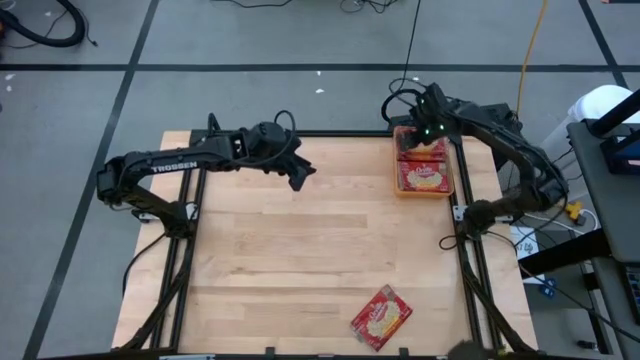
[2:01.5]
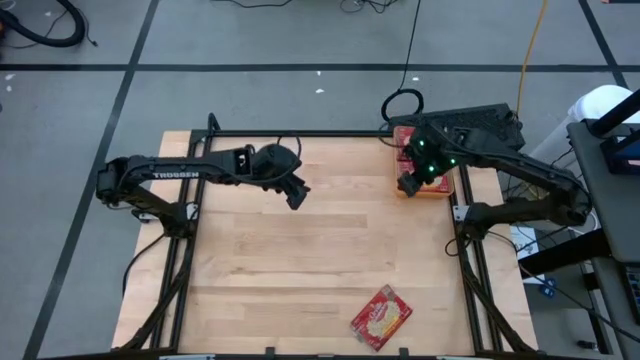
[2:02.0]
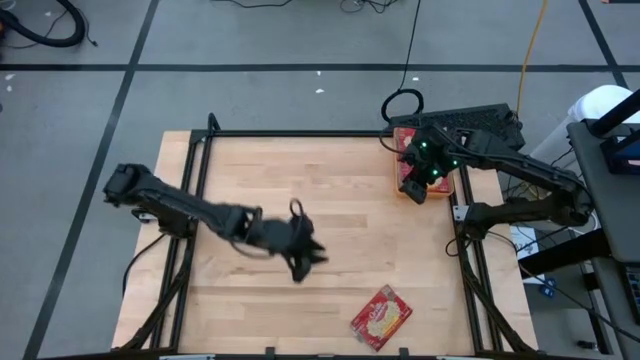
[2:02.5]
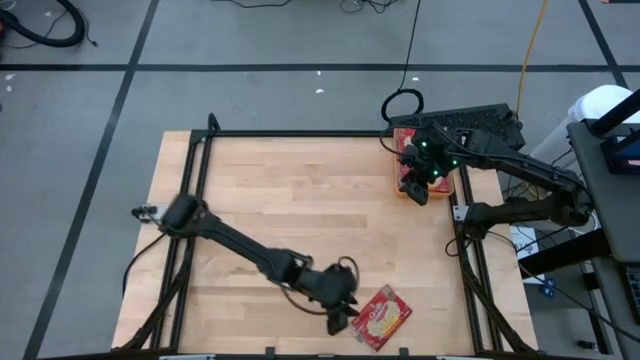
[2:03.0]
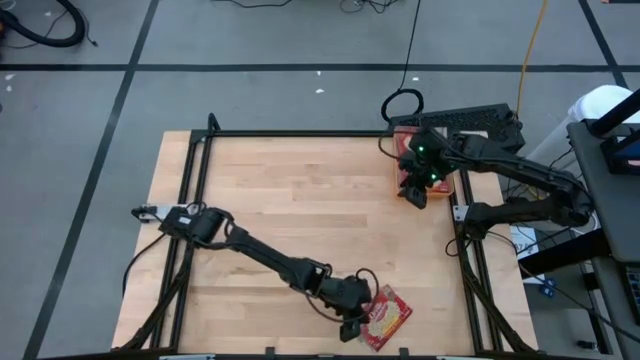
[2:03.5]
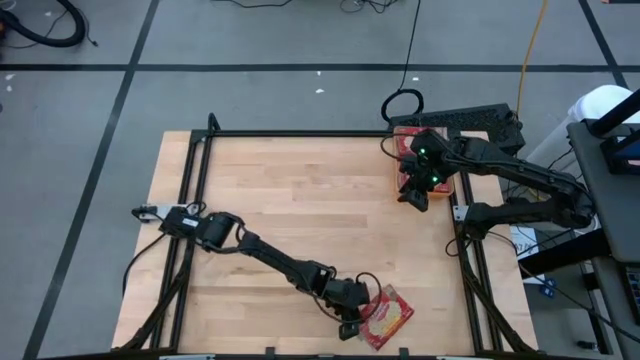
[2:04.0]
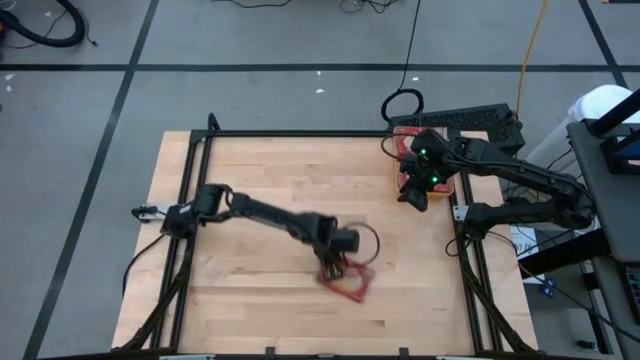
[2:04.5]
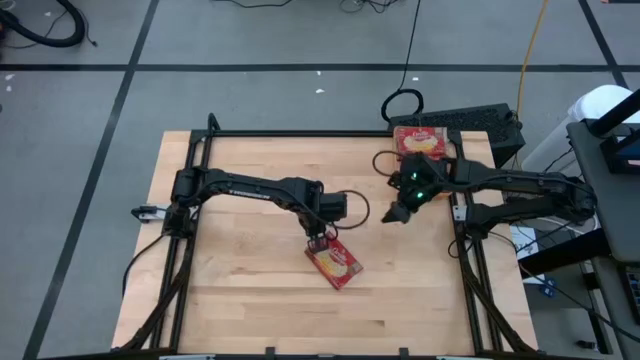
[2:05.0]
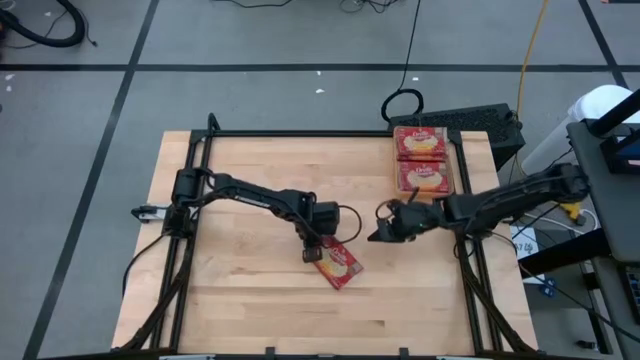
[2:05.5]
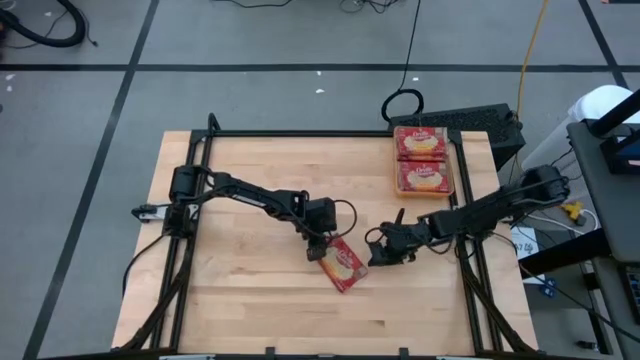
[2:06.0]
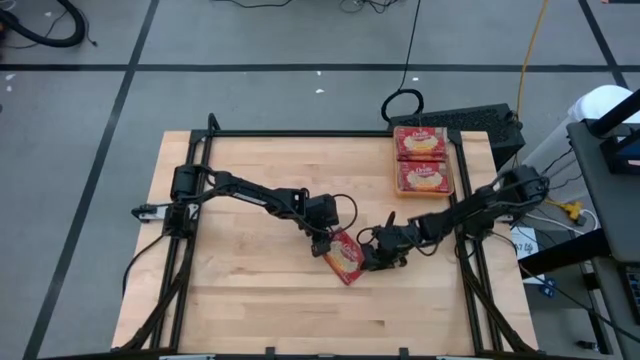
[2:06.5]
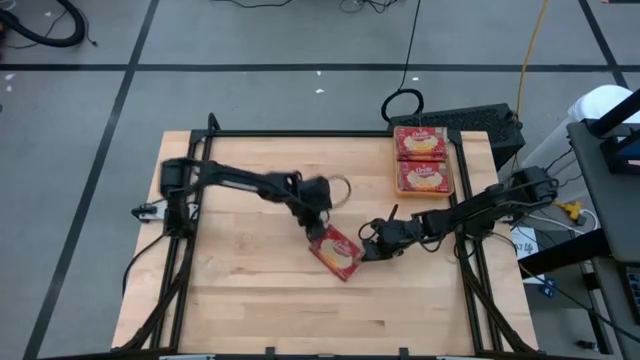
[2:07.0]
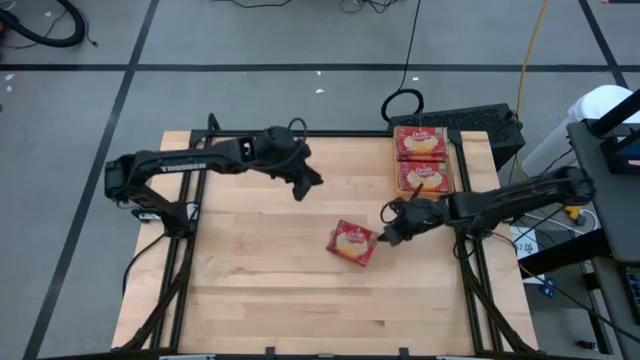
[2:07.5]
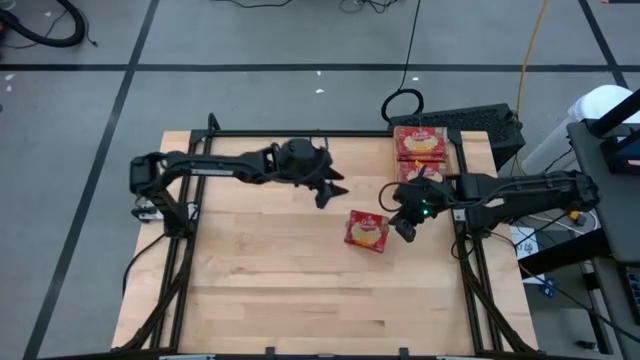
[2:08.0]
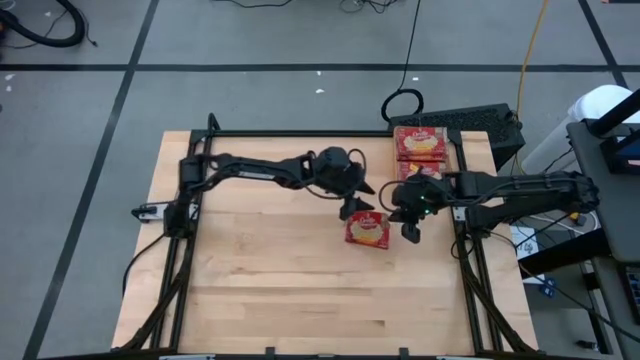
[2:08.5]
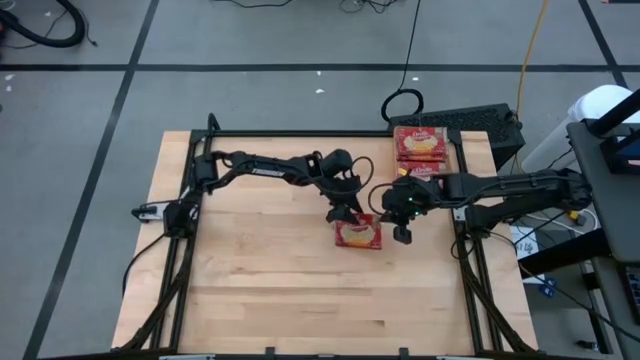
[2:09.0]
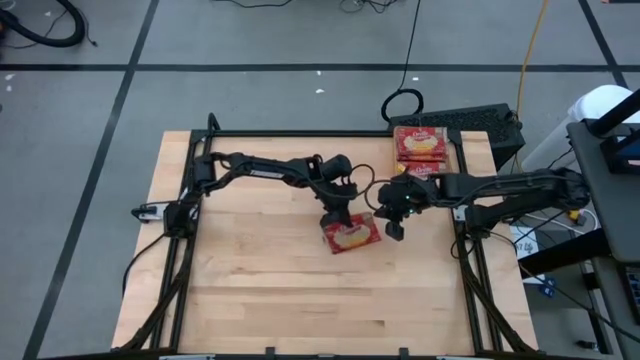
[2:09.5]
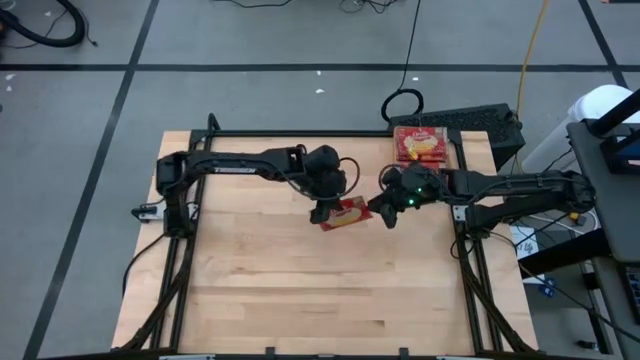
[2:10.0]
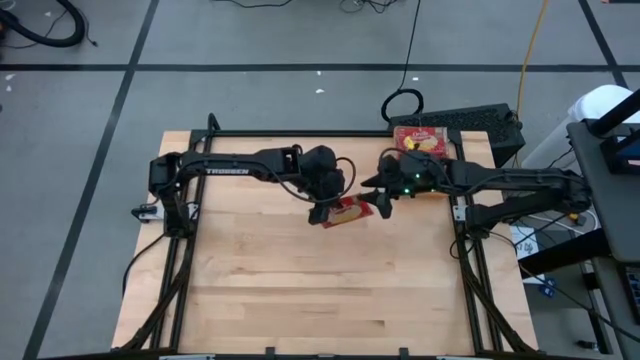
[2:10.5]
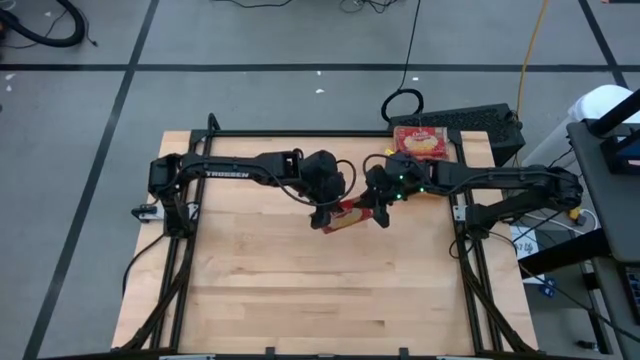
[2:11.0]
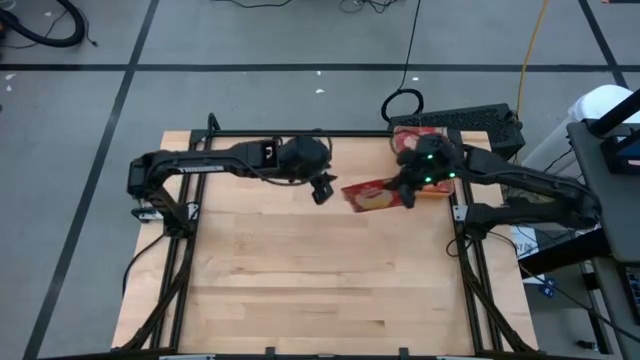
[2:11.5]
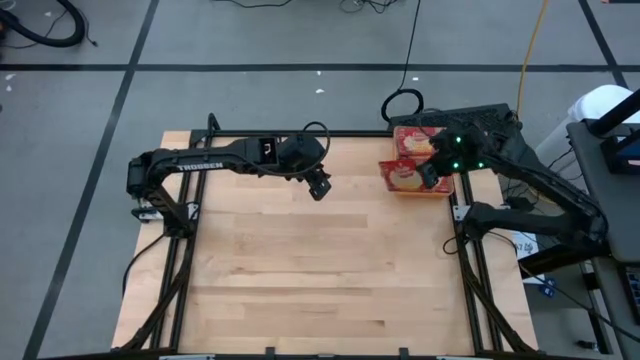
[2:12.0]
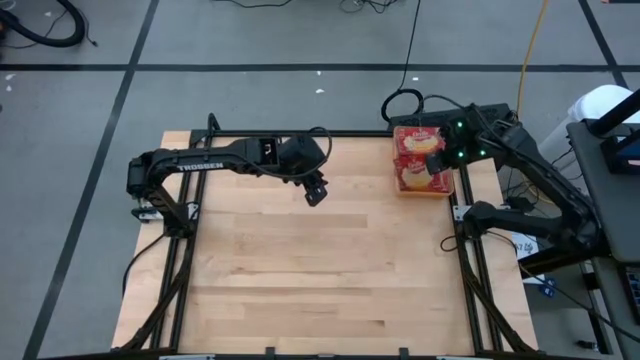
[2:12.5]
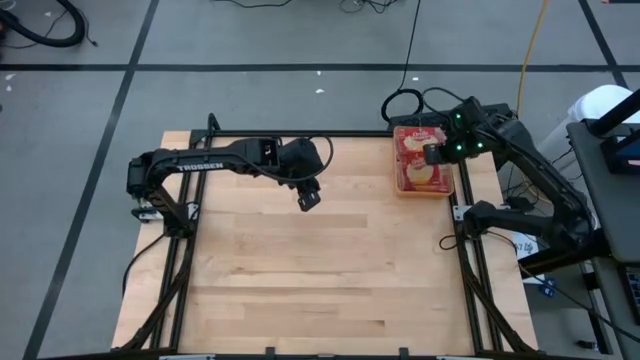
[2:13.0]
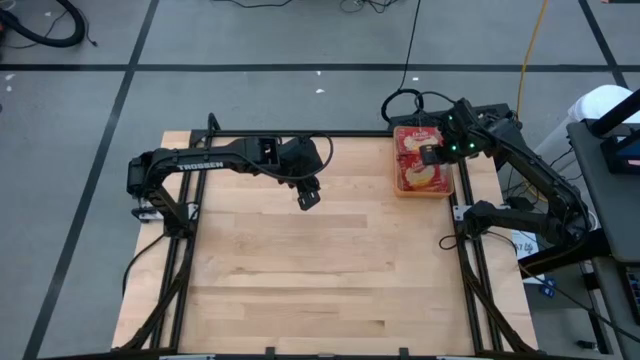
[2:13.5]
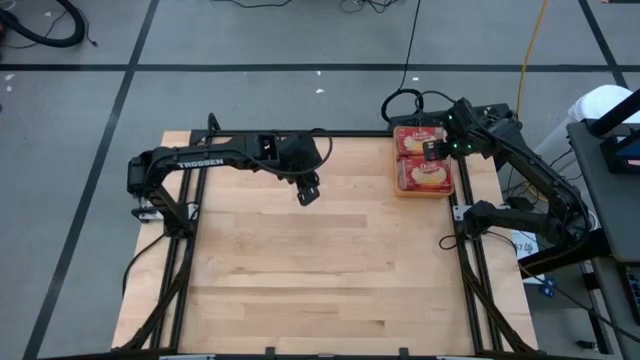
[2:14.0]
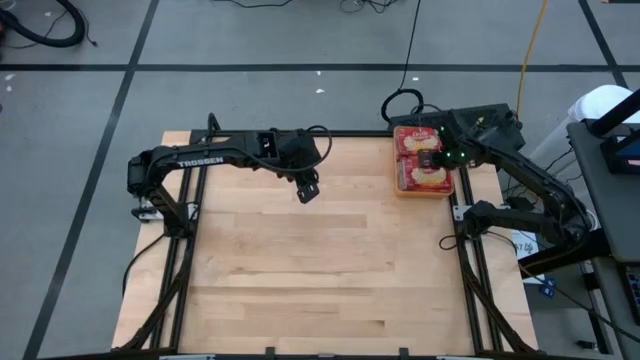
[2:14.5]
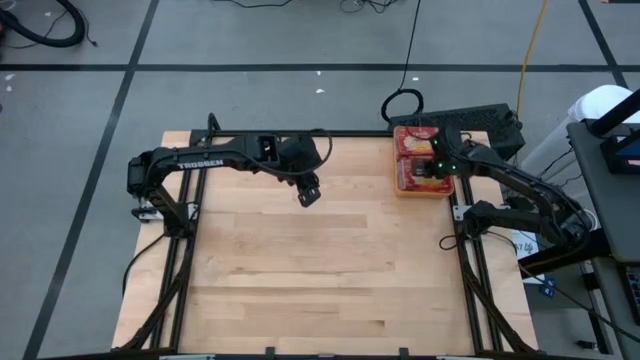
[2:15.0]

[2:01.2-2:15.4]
Task: Sort popcorn bags into baskets
Put the red popcorn bag into the orange bin

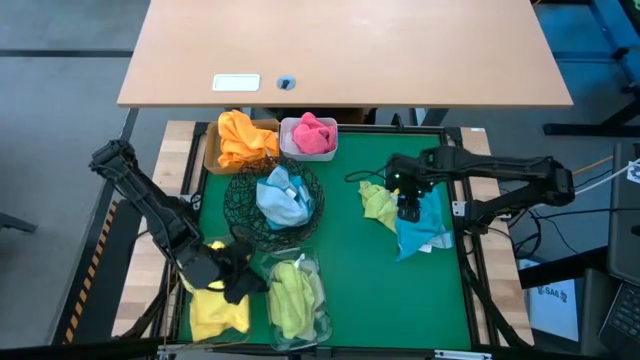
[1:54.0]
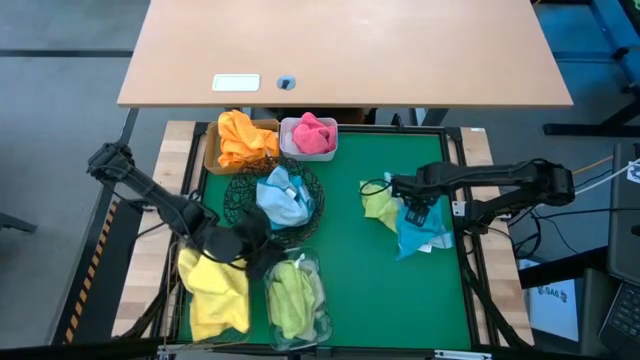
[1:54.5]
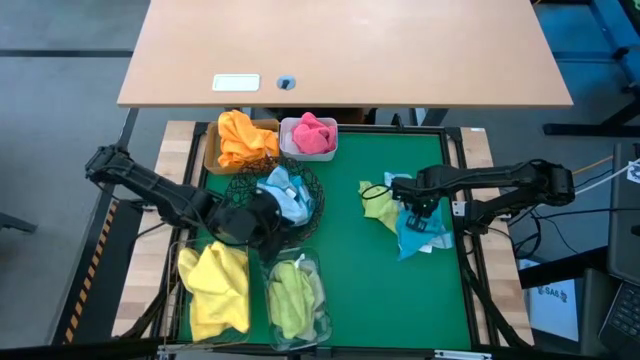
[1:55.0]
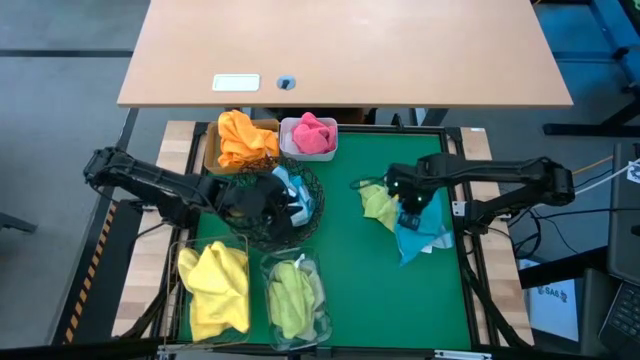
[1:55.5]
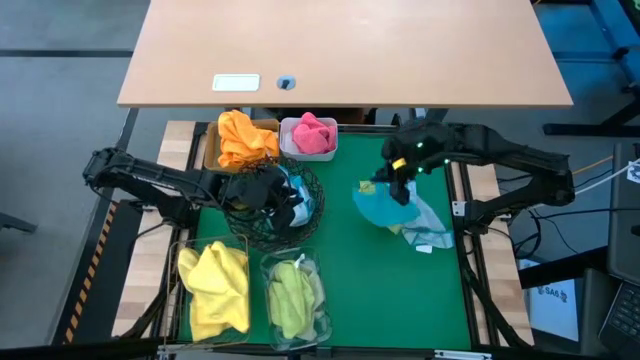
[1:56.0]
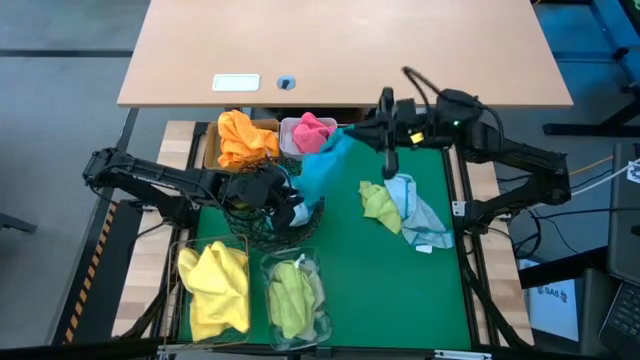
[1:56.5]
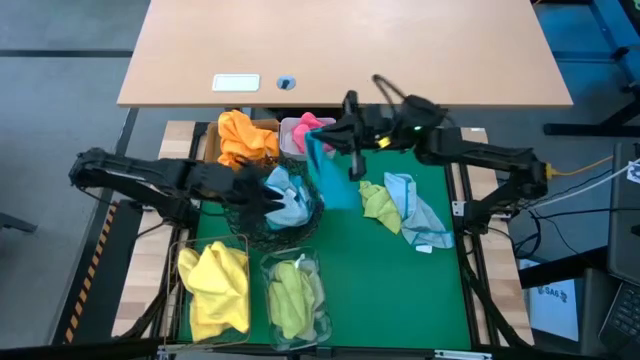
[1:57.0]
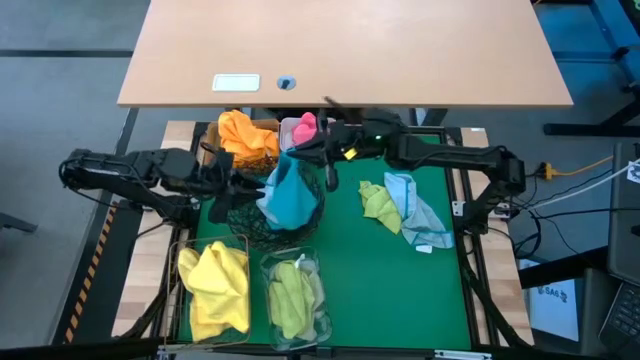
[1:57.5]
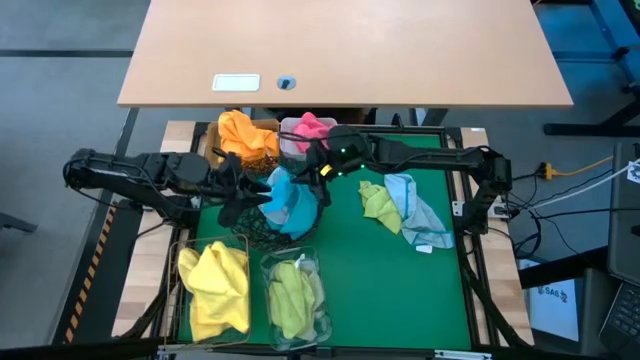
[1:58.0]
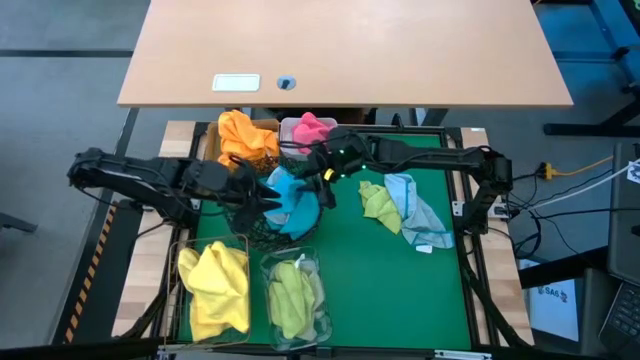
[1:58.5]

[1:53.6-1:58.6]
Task: Sort microfiber towel by color & place in baskets
Put the light blue microfiber towel into the mesh basket
